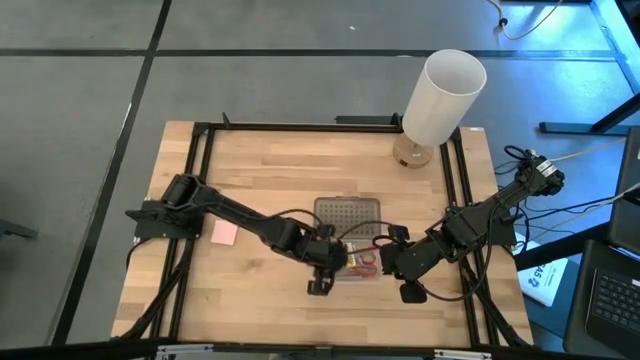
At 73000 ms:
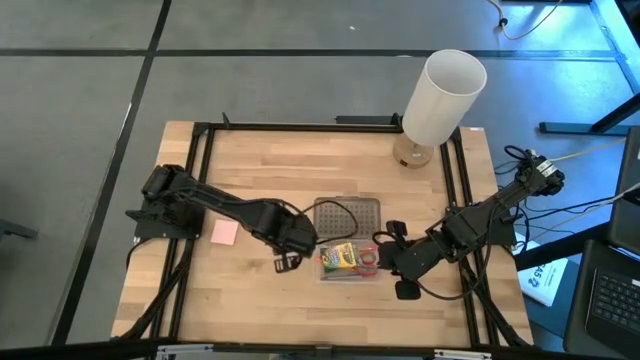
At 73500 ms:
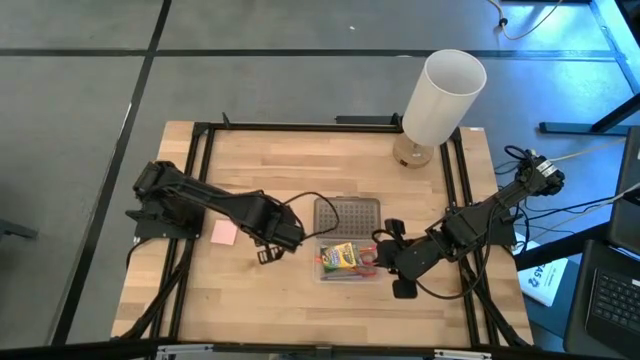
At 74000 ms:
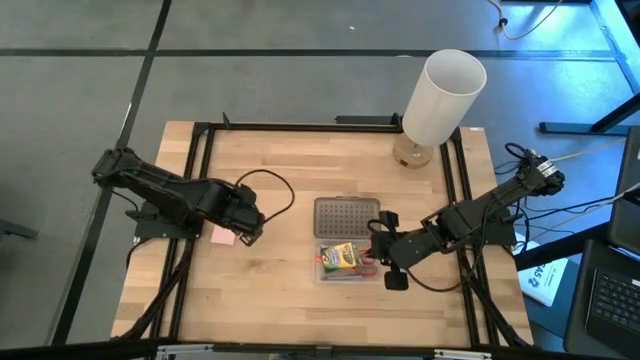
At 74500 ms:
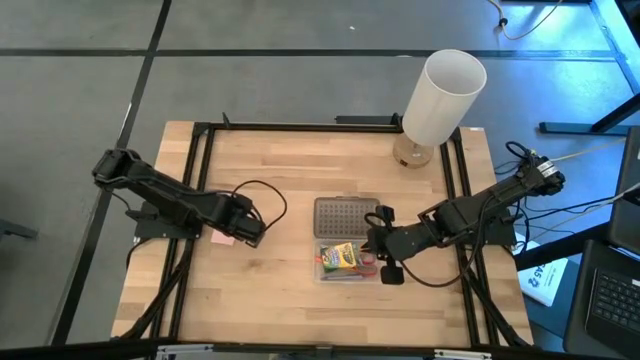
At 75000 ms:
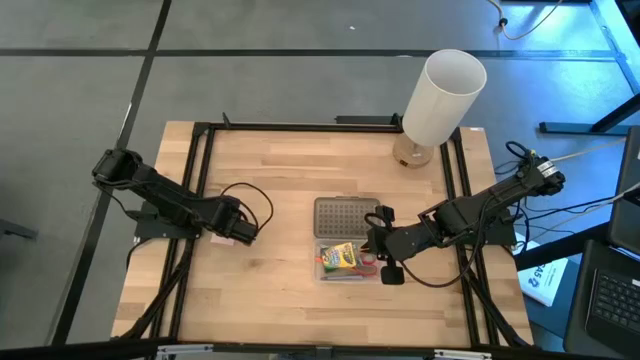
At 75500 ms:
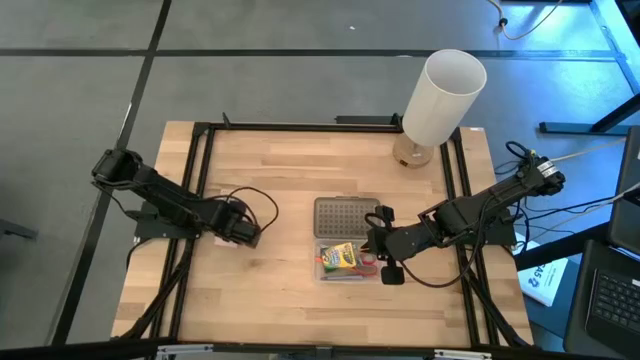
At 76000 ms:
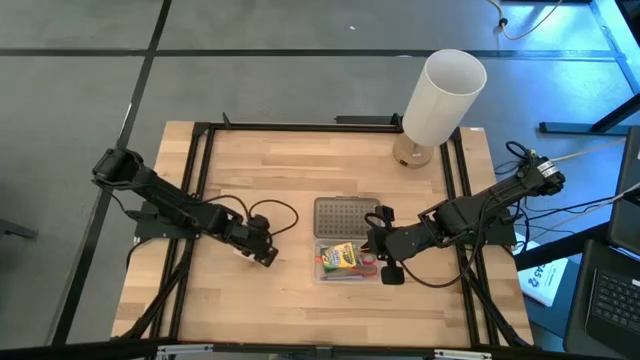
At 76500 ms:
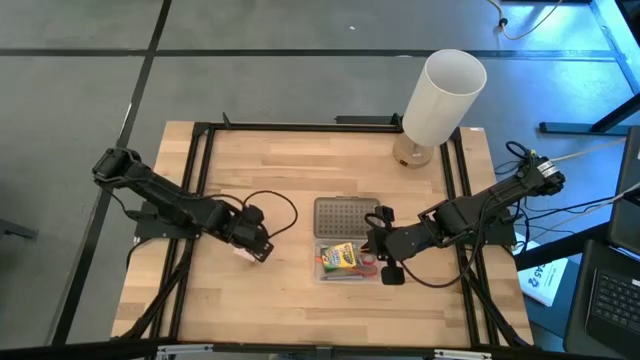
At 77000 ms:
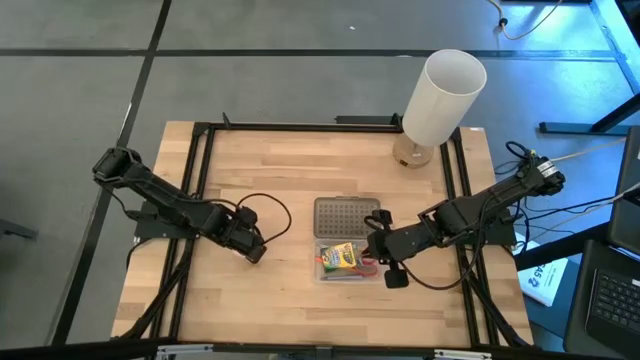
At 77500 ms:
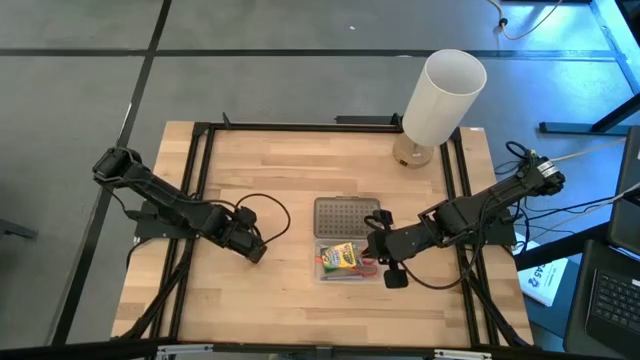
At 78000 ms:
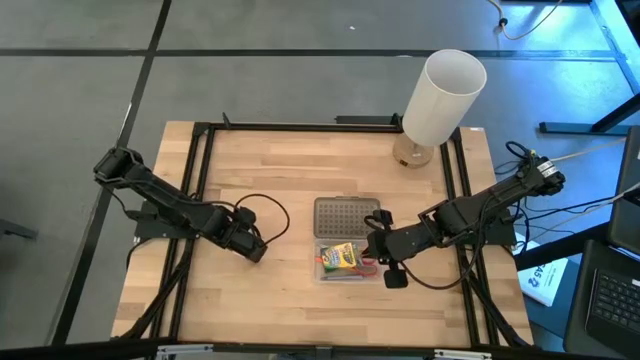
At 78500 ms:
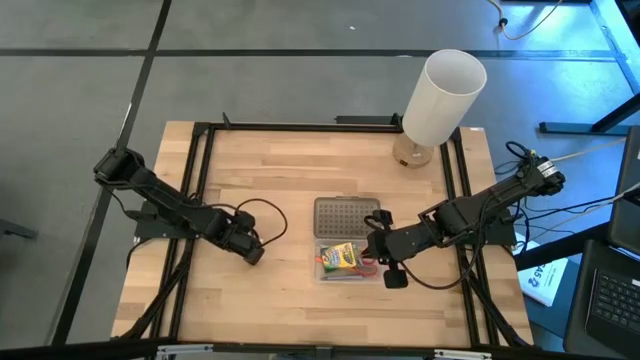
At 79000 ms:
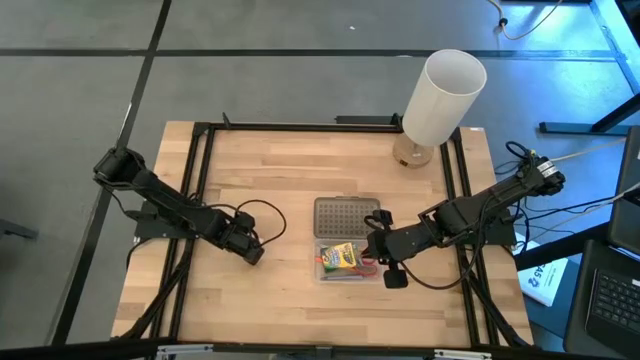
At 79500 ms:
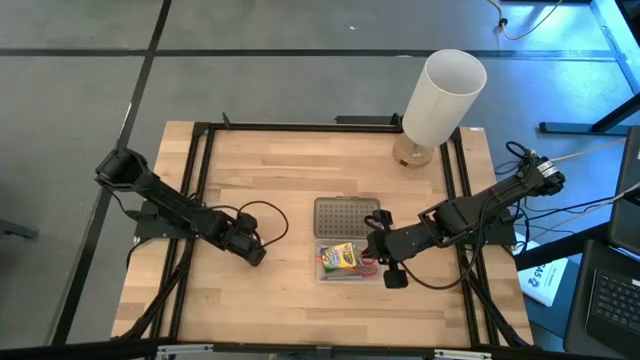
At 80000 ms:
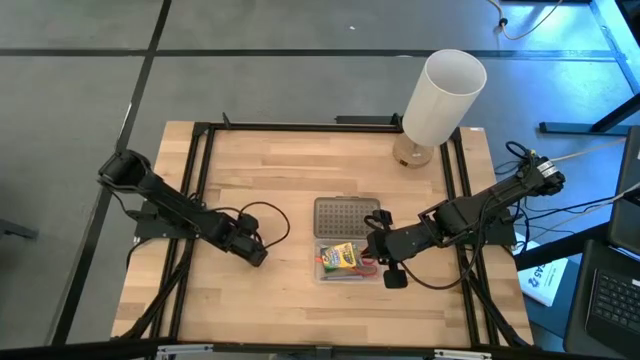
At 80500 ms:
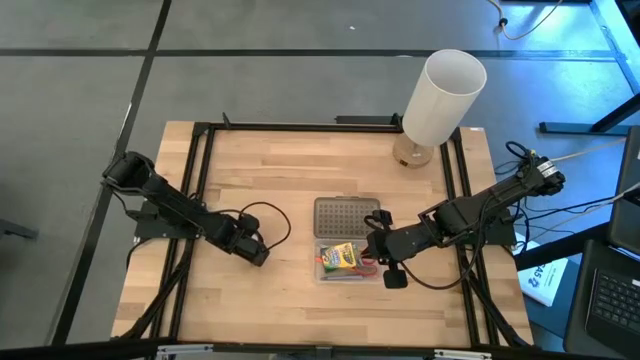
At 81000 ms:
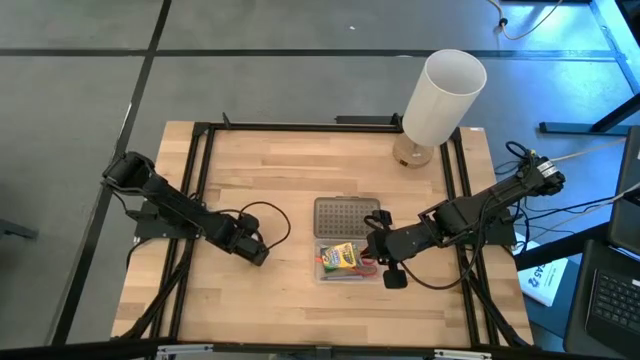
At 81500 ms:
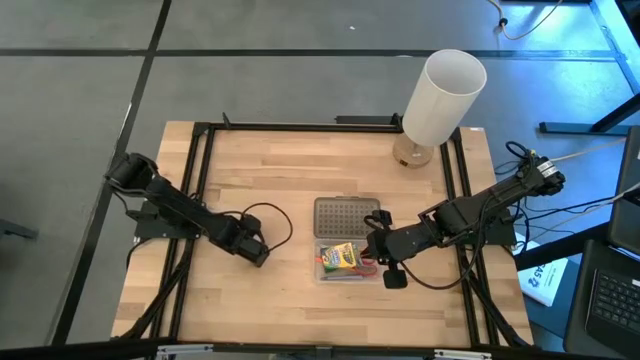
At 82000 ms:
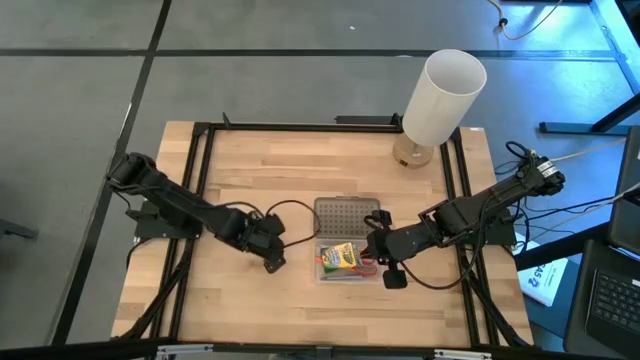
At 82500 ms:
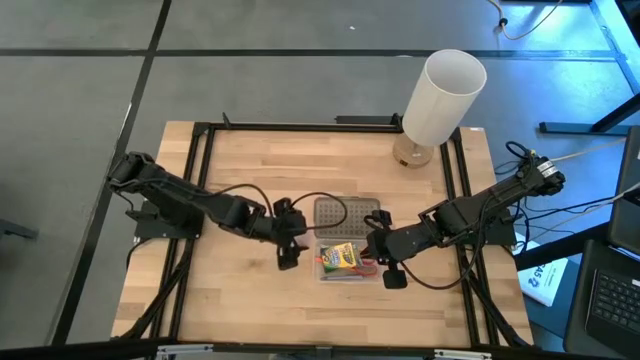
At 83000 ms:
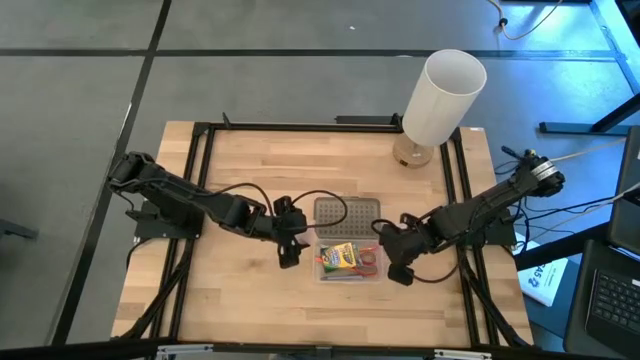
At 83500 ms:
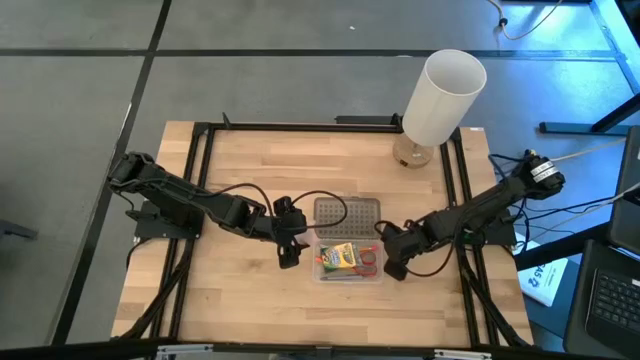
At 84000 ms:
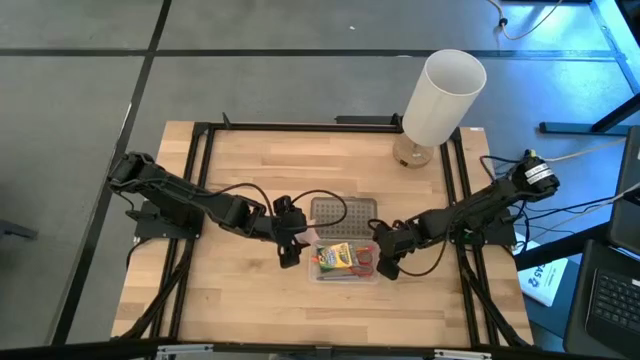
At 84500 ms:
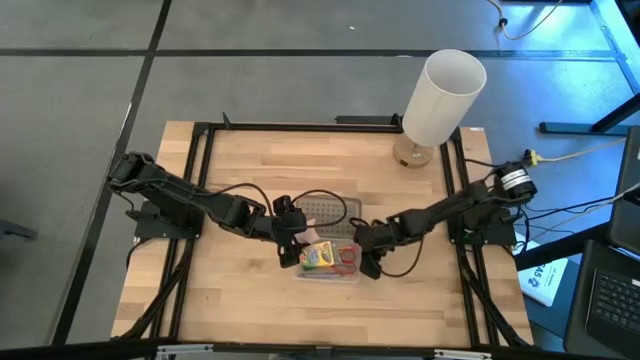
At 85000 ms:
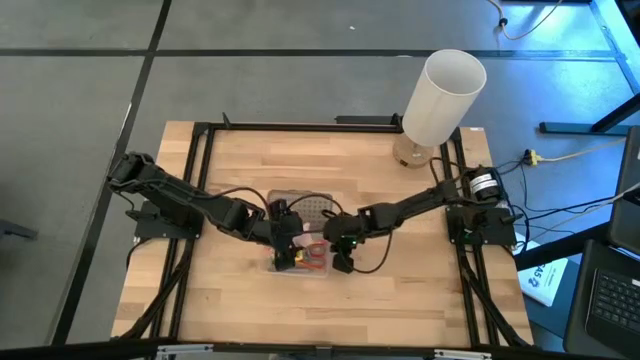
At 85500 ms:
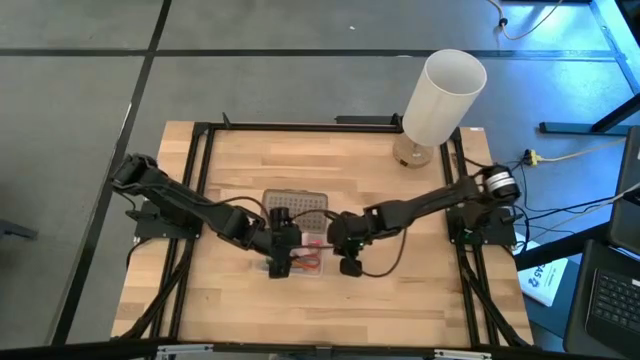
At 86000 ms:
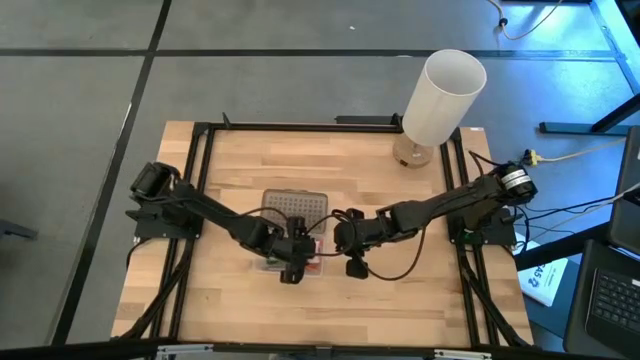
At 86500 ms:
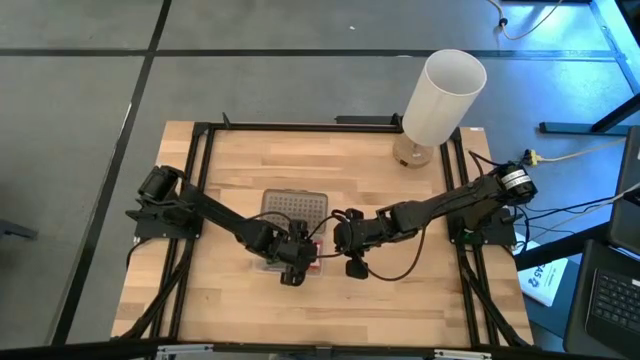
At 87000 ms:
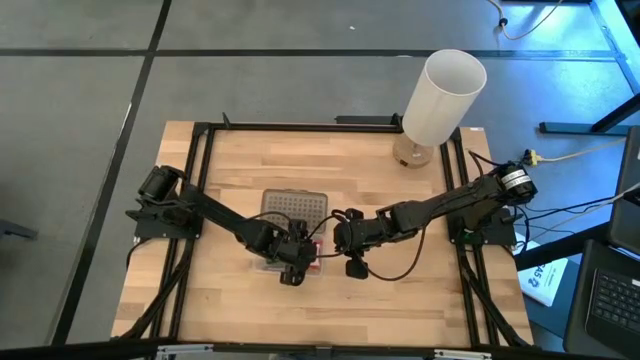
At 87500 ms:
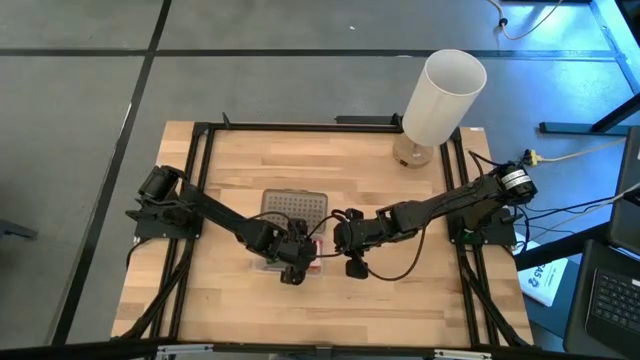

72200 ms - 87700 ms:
Task: Pack school essentials
Put the pink sticky note into the supply box

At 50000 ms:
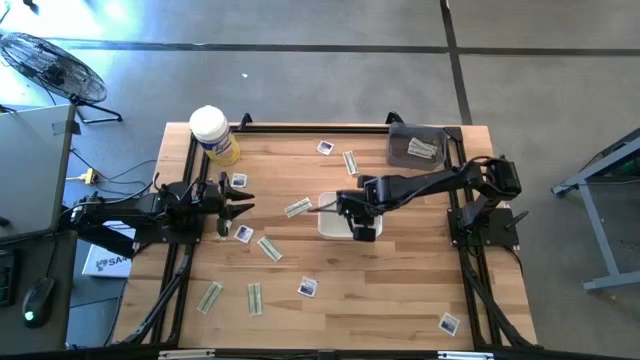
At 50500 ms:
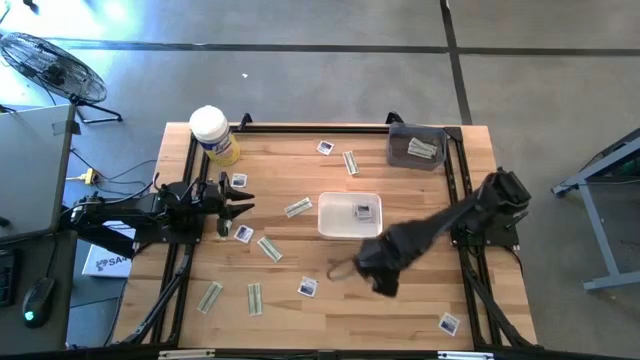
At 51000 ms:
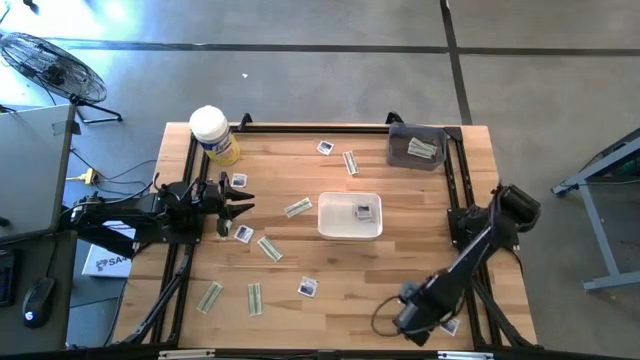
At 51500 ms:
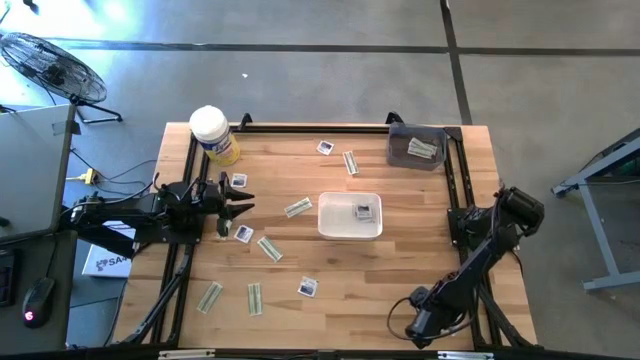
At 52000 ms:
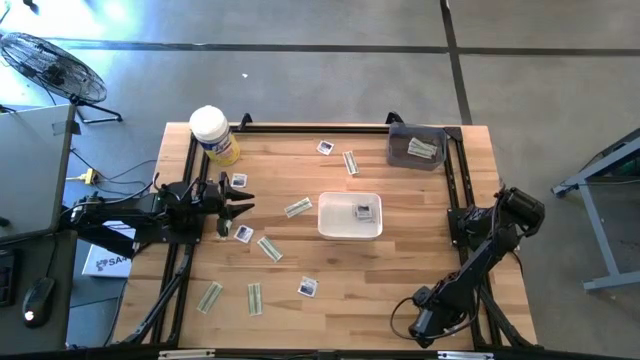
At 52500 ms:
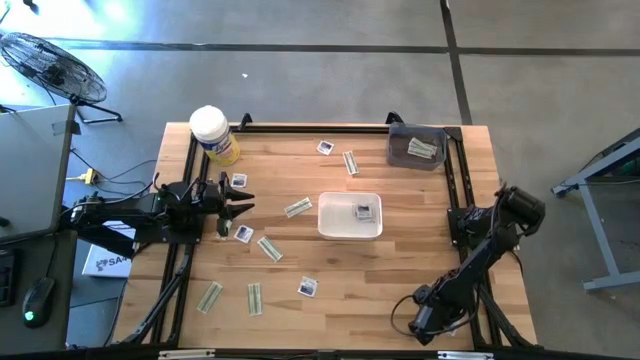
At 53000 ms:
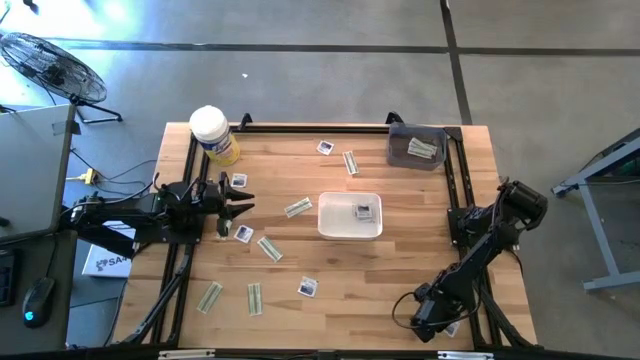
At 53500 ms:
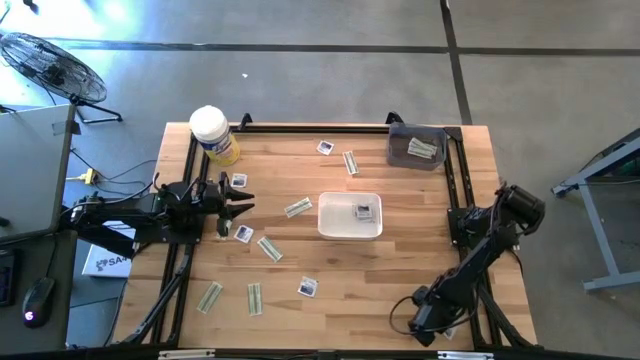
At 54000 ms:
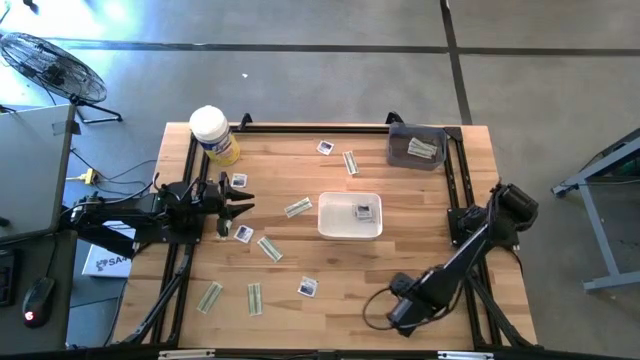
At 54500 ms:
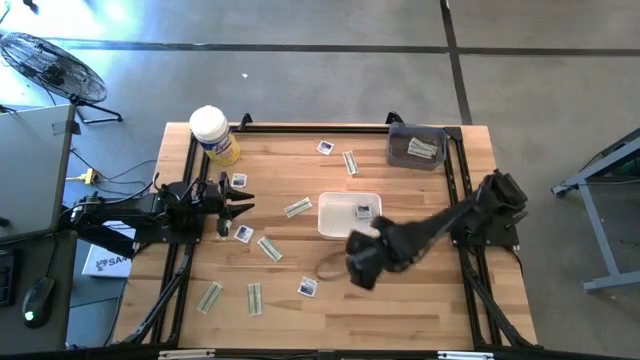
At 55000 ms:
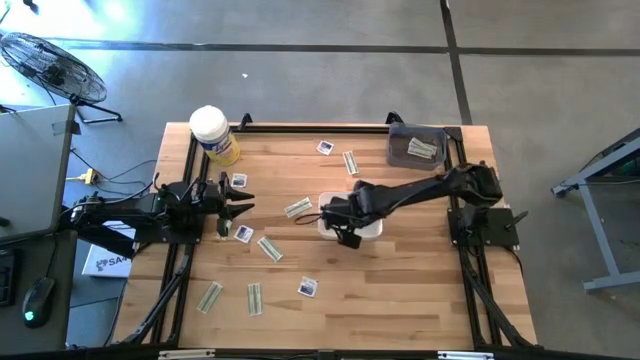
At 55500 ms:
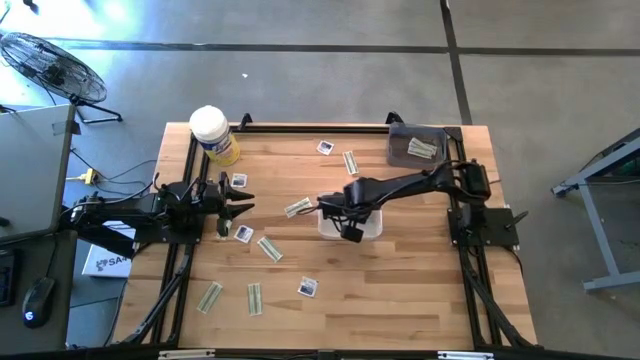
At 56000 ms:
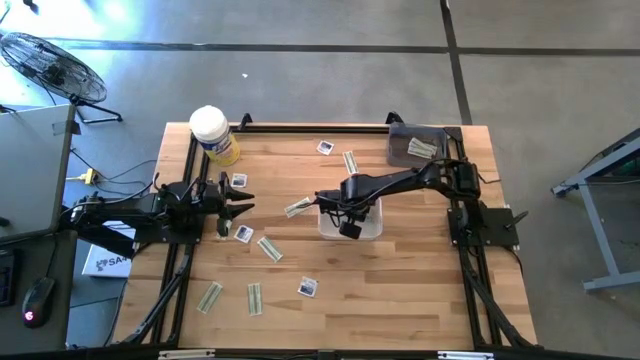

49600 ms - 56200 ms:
Task: Pick & Place First Aid Supplies
Put the blue alcohol pad into the white bin

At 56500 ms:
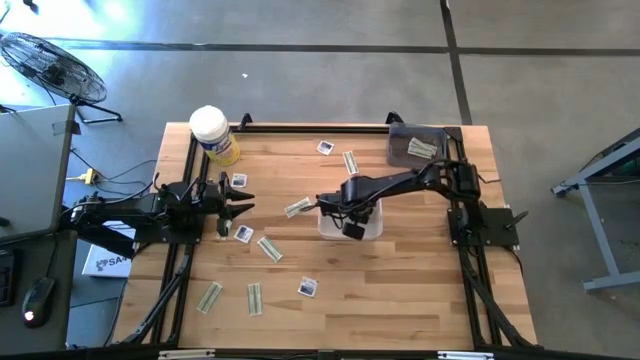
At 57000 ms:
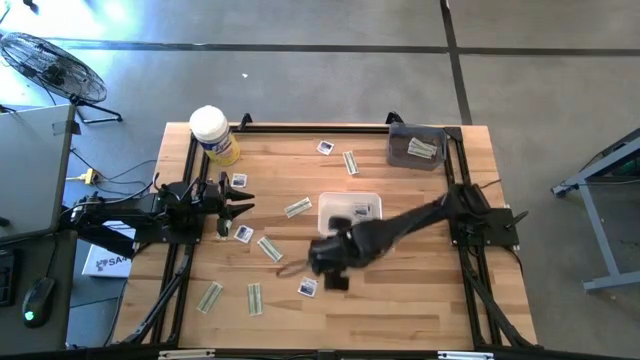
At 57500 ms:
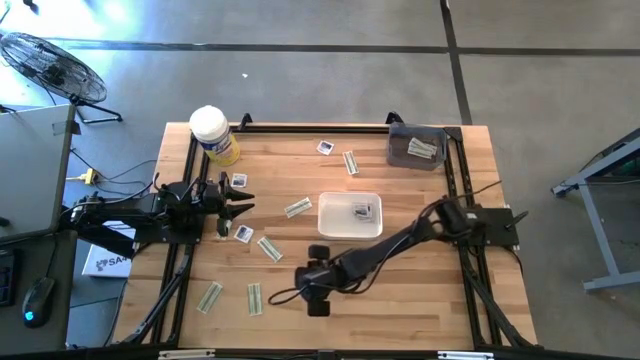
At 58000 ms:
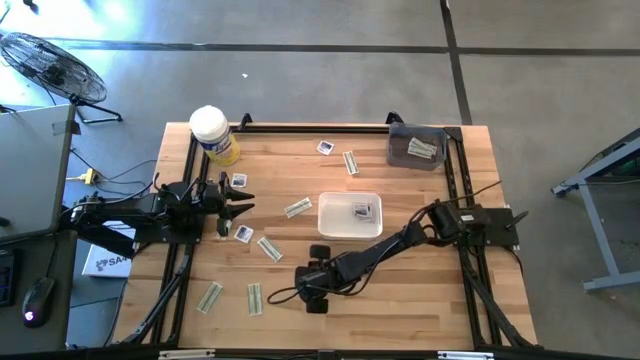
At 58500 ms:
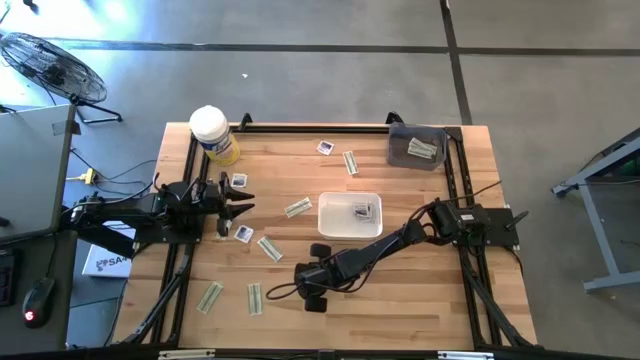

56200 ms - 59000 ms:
Put the blue alcohol pad into the white bin
